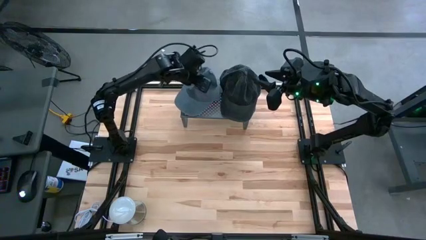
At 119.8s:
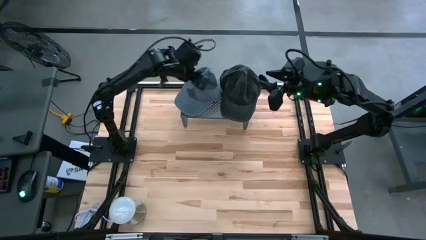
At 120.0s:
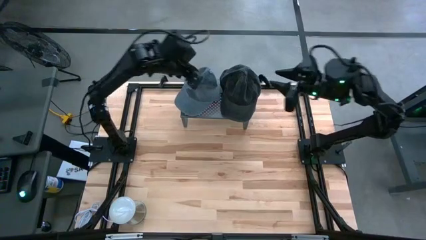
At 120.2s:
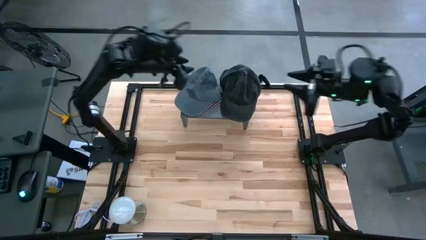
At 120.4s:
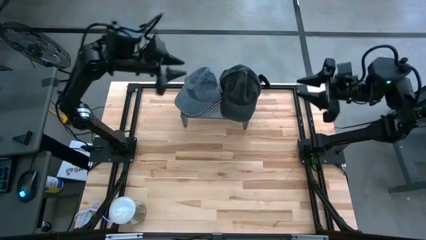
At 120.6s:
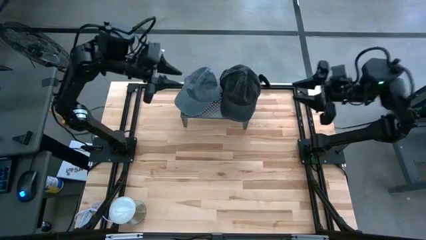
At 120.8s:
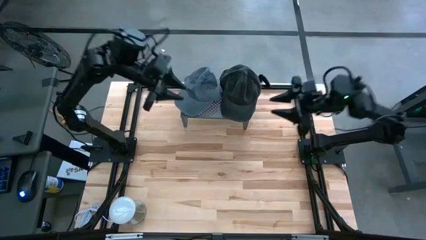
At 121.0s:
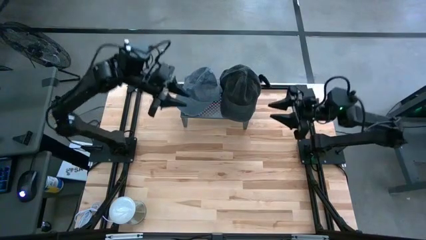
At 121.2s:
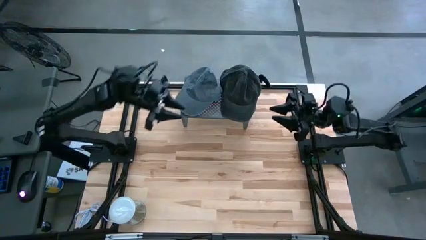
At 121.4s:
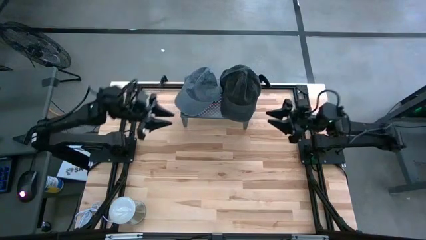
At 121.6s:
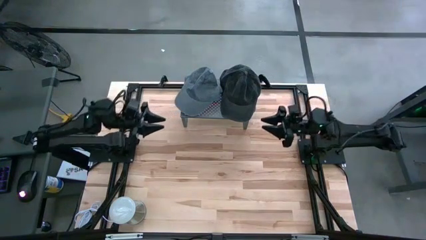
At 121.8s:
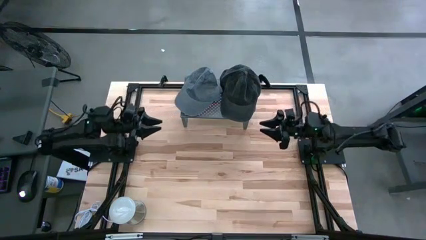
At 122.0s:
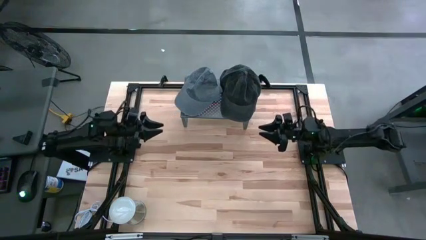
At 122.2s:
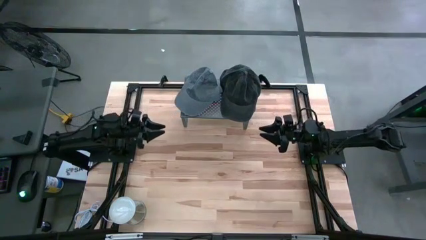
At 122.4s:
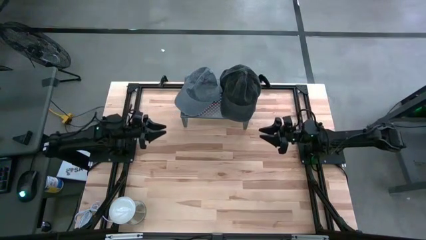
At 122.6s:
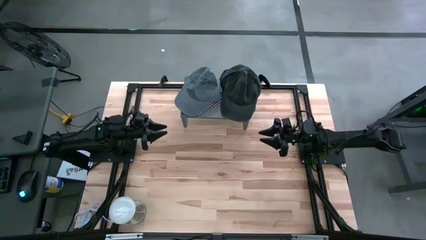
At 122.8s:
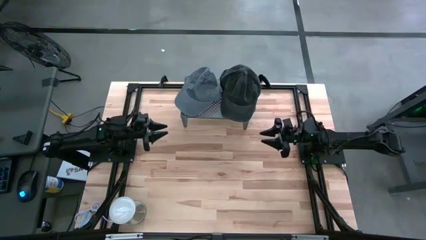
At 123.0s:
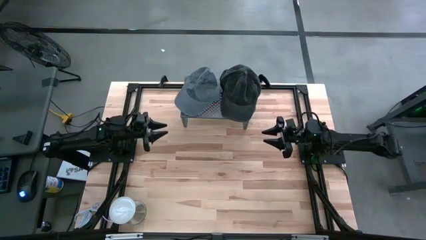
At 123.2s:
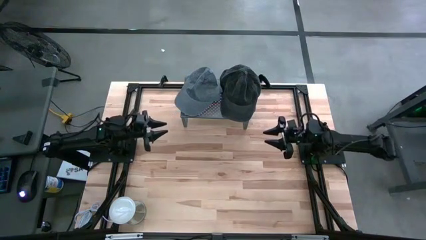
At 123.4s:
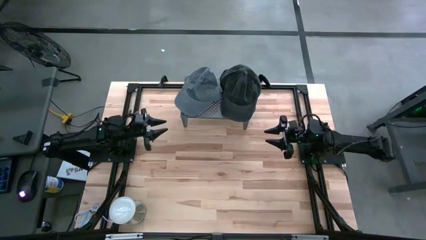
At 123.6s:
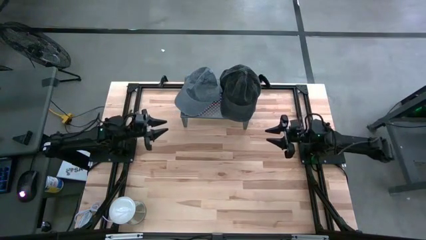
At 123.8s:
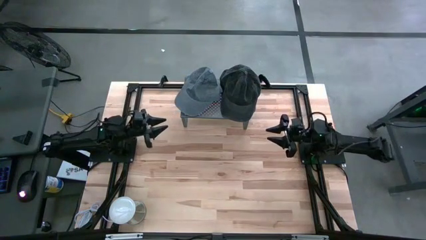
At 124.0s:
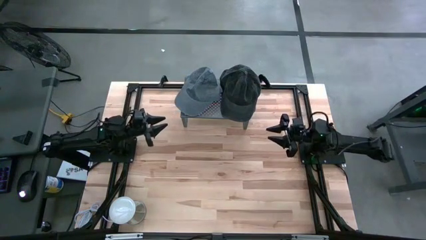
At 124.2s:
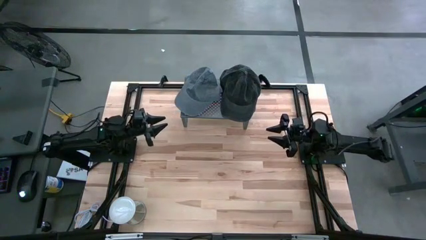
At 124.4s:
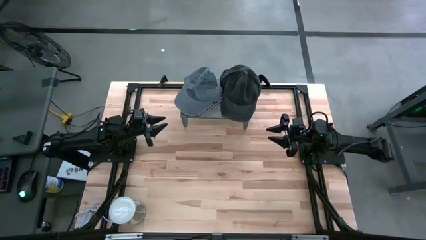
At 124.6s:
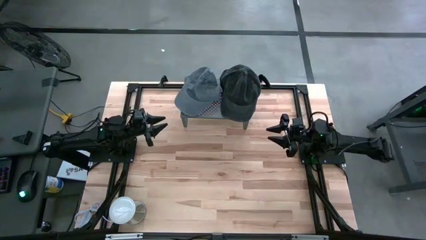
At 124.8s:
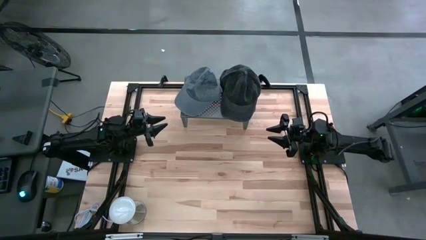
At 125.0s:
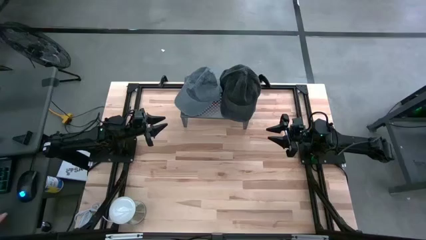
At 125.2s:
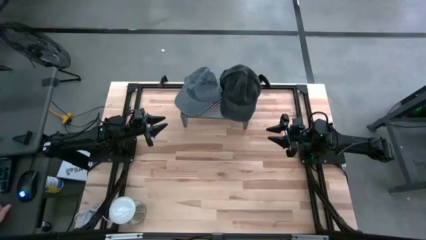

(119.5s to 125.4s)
Task: Pick & Place hat
Return to home position

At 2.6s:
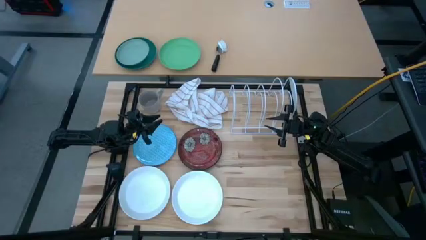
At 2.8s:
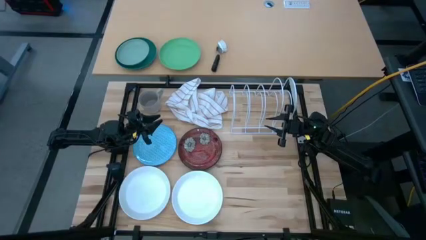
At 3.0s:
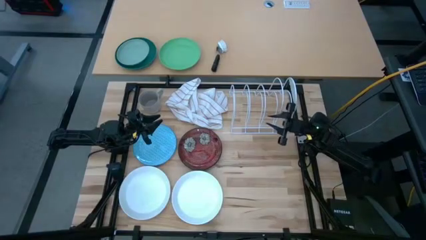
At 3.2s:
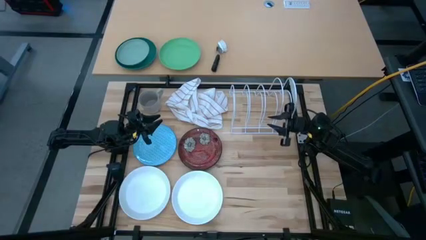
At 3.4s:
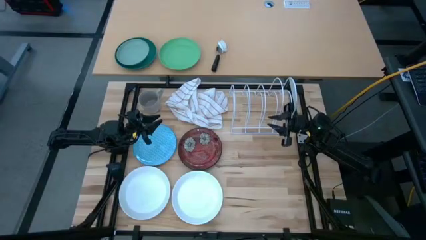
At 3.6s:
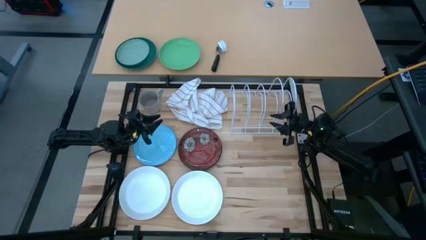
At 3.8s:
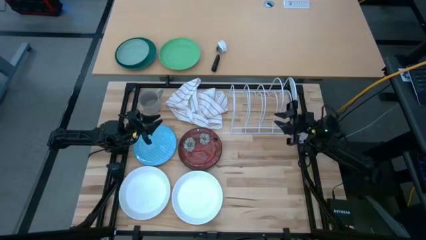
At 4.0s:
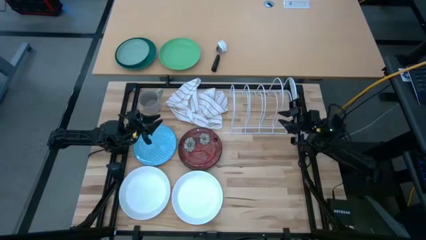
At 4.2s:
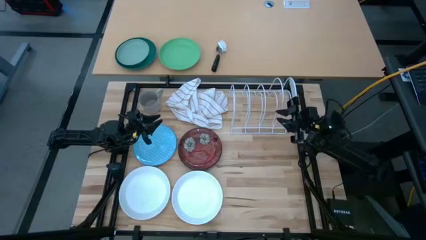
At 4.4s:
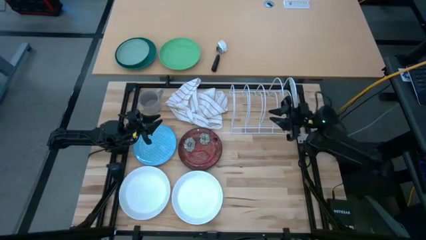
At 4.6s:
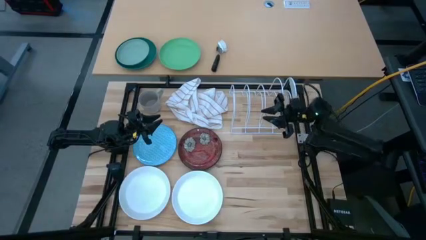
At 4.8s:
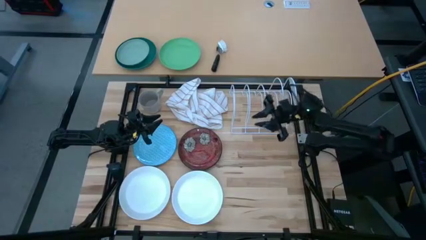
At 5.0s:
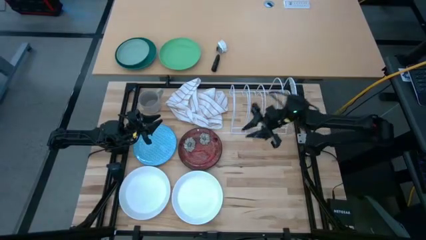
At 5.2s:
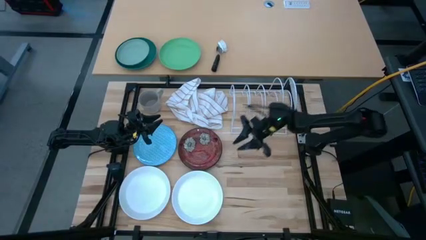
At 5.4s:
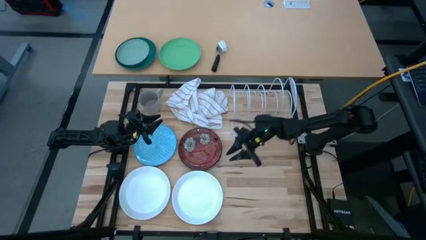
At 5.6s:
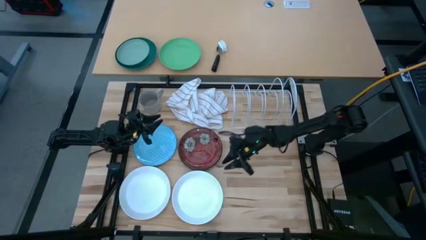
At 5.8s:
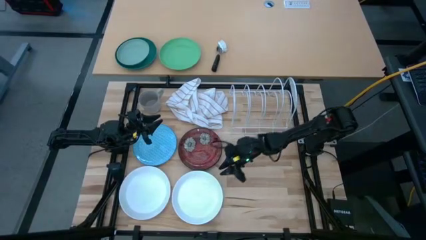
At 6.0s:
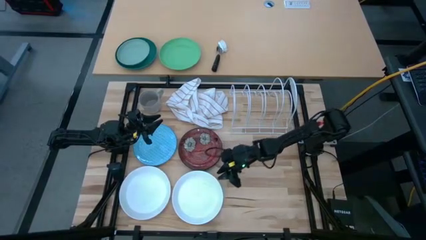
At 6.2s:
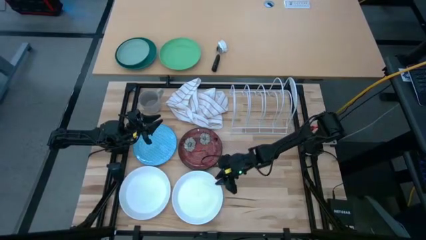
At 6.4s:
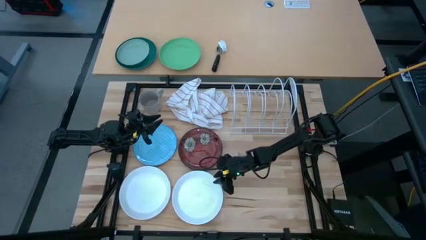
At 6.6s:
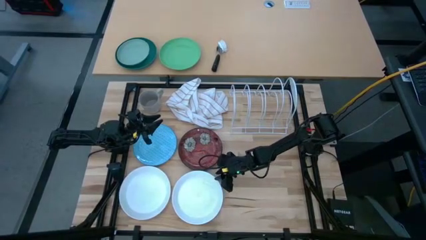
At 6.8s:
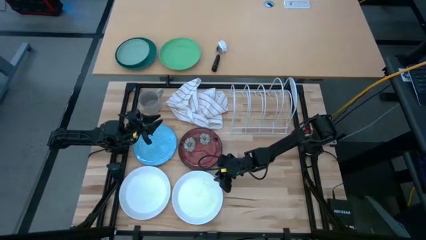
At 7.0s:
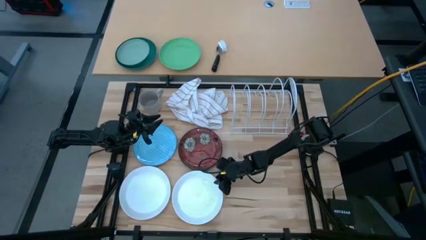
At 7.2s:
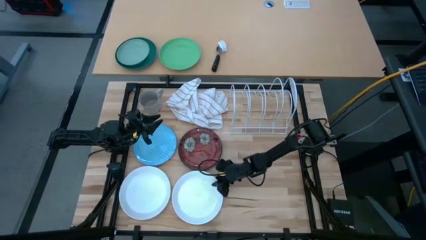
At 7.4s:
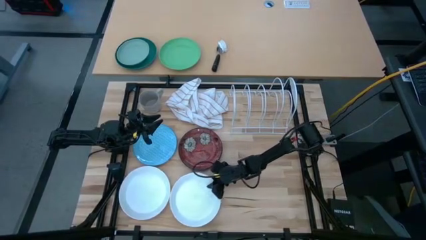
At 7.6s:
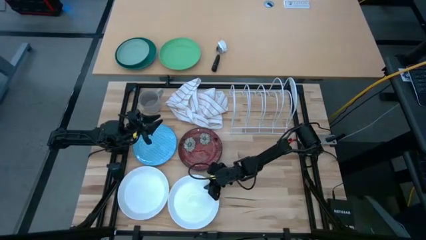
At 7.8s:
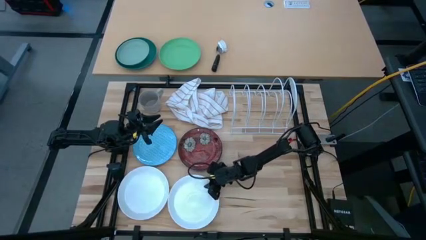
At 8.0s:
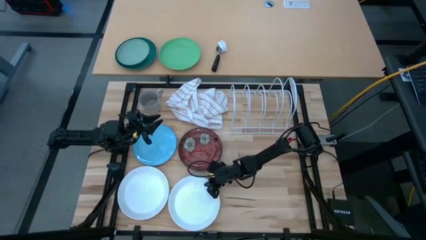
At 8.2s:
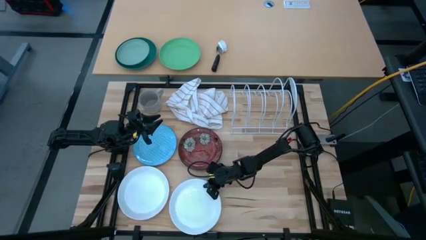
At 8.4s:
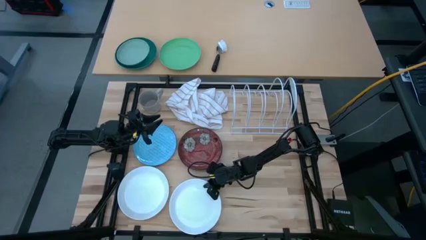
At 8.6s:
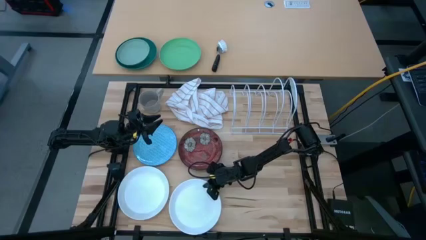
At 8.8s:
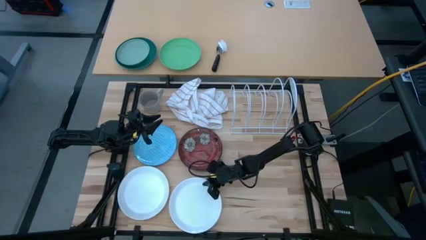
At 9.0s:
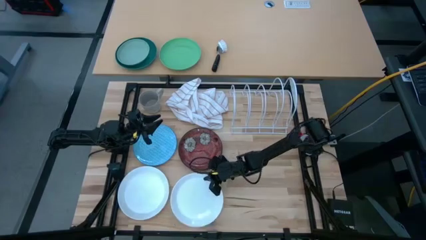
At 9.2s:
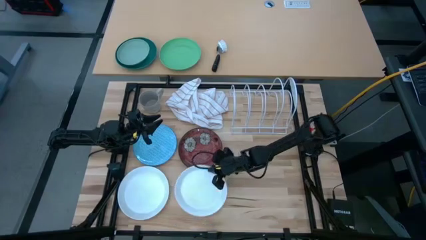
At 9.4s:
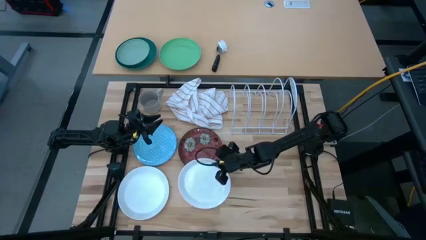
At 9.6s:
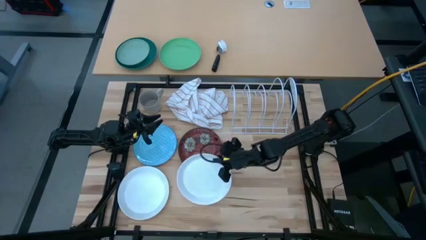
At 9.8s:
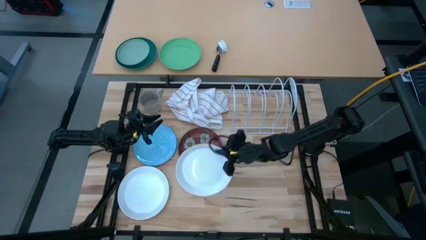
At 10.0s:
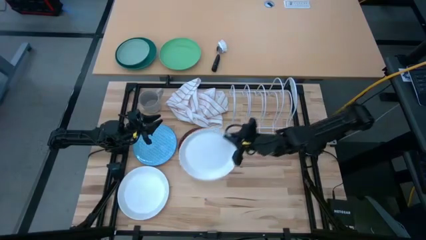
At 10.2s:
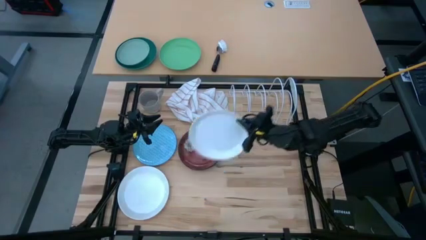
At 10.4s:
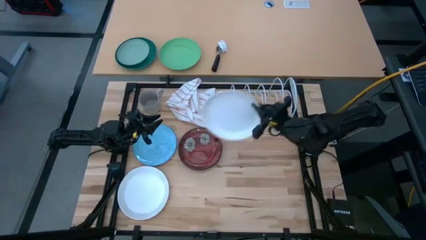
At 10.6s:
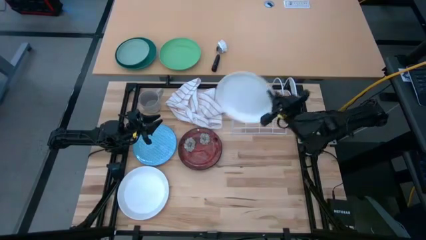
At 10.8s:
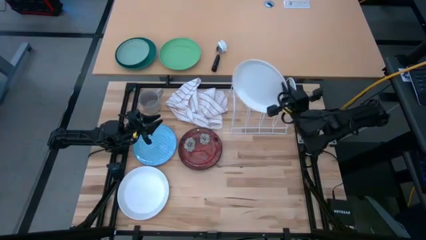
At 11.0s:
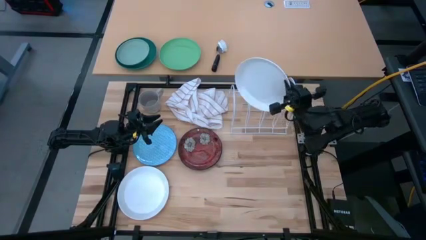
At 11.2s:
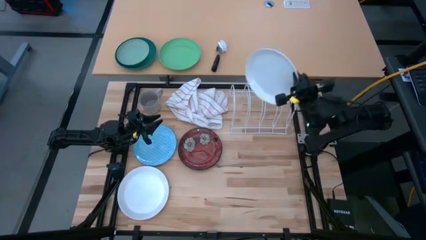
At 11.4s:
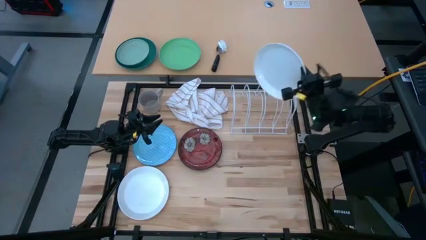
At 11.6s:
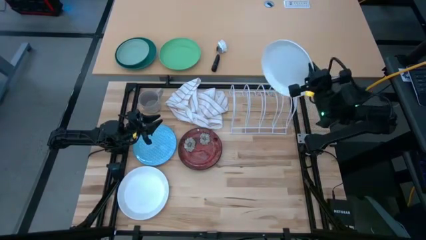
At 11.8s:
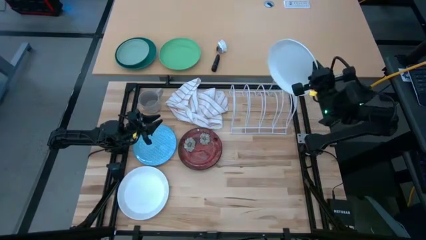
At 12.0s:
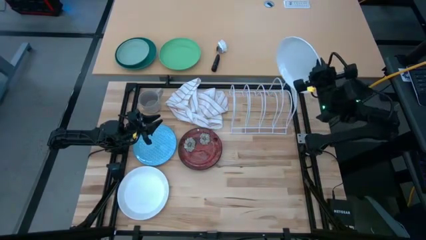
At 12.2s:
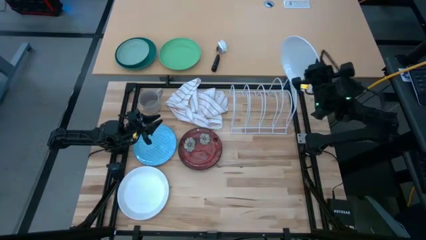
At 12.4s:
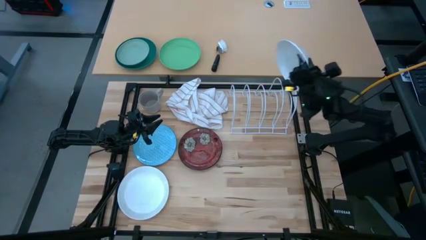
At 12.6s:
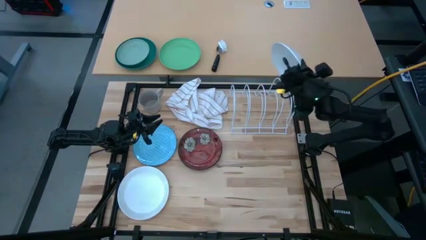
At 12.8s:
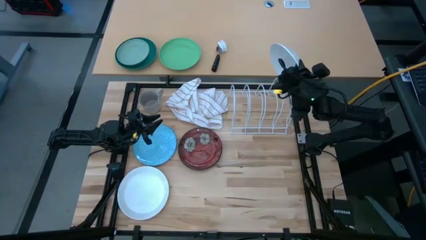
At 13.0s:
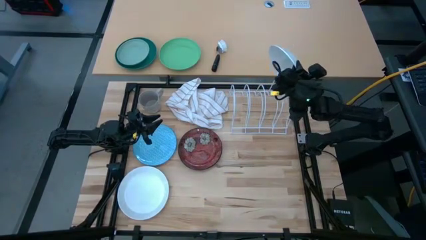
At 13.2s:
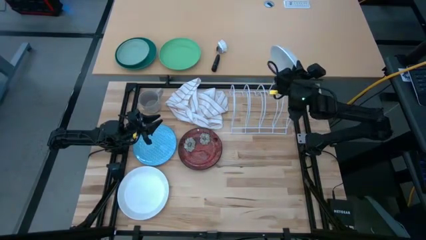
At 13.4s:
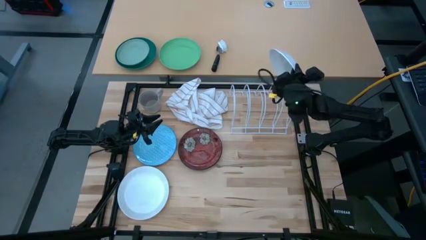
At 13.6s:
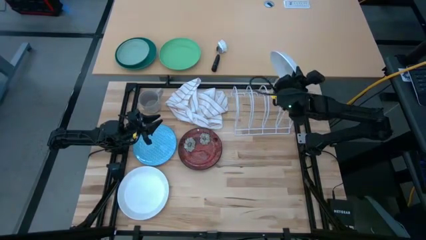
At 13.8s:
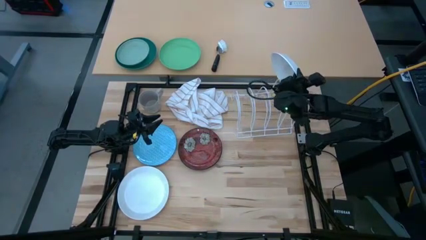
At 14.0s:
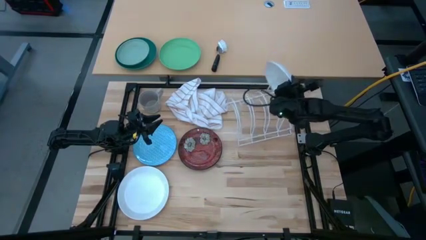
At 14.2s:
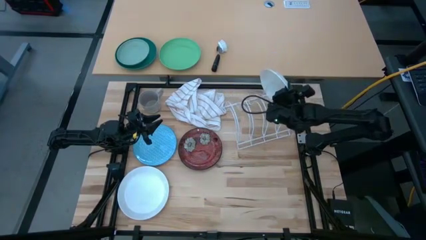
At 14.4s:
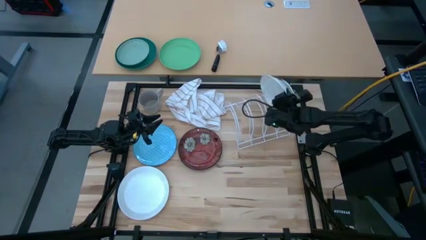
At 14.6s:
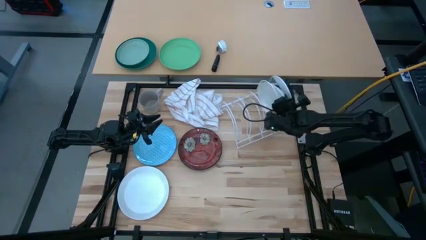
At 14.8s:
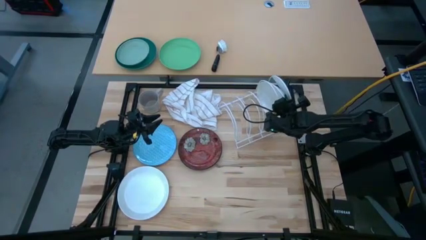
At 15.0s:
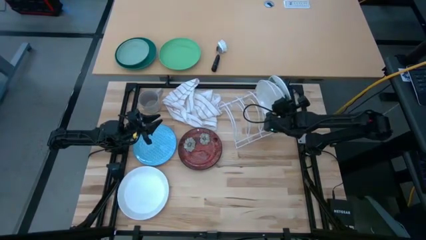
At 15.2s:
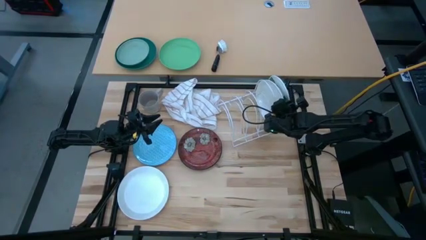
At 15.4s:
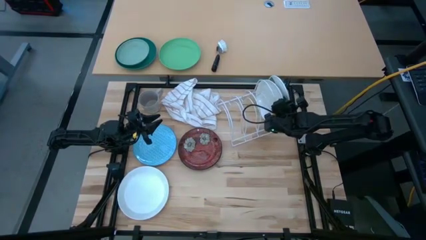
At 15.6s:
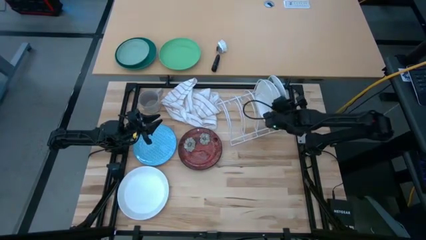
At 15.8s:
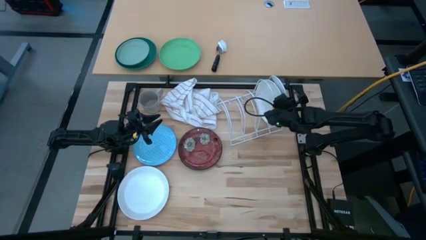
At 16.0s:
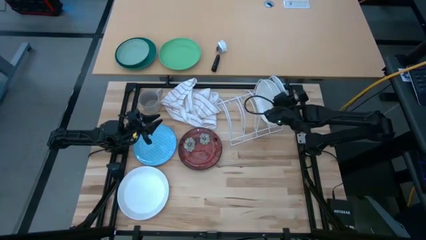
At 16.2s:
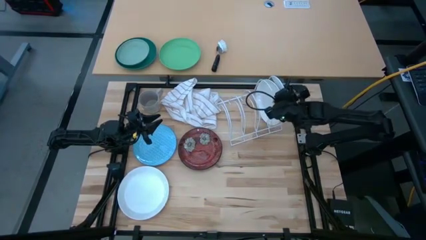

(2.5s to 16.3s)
Task: Sort dishes
Put the right white plate into the white dish rack
